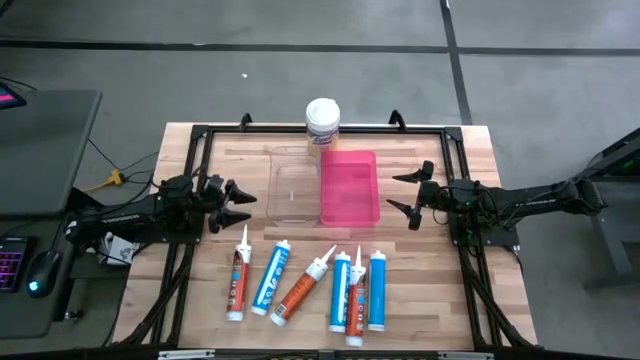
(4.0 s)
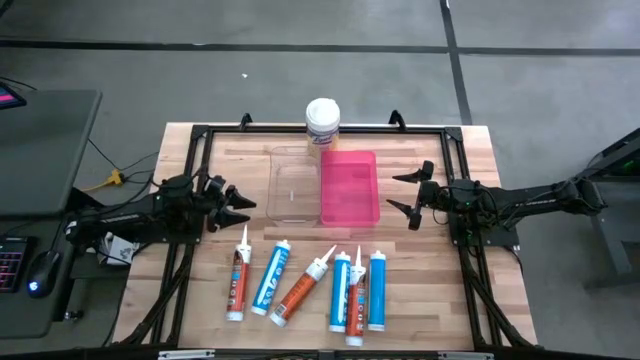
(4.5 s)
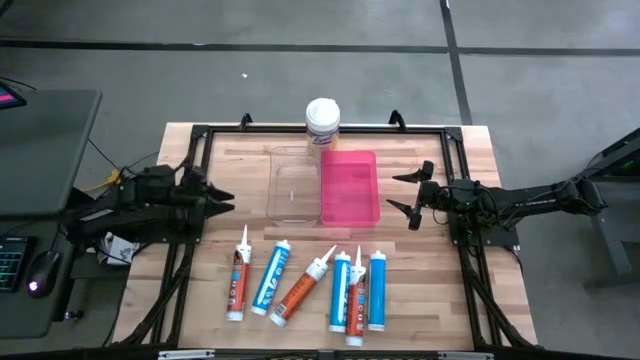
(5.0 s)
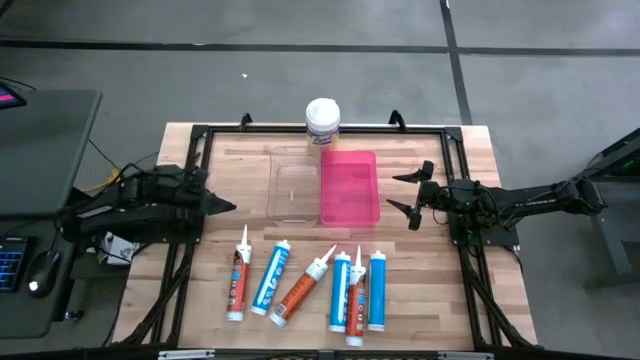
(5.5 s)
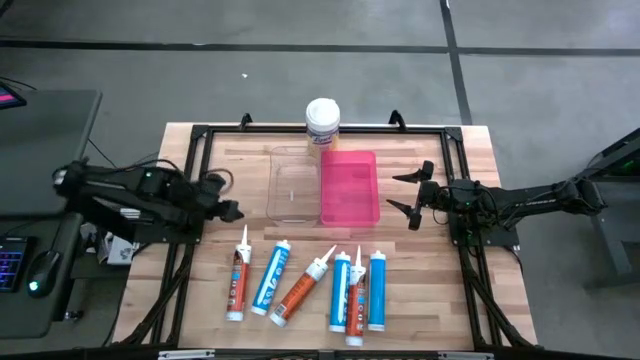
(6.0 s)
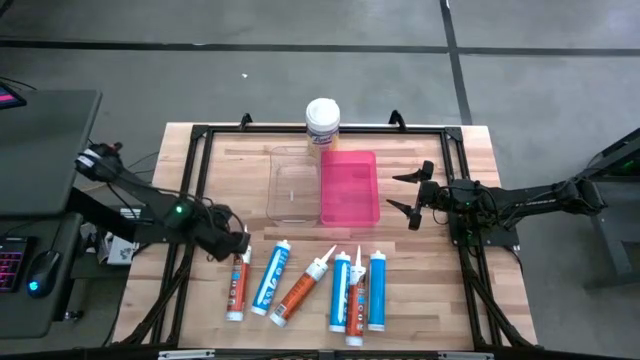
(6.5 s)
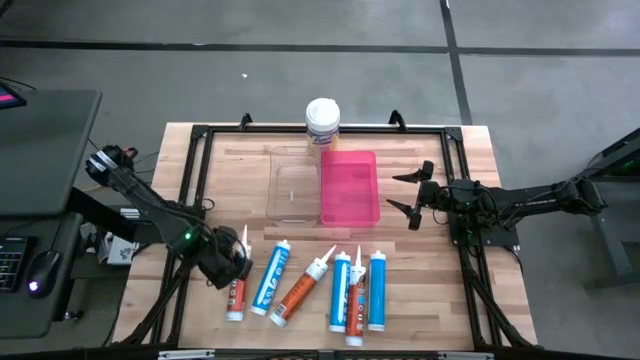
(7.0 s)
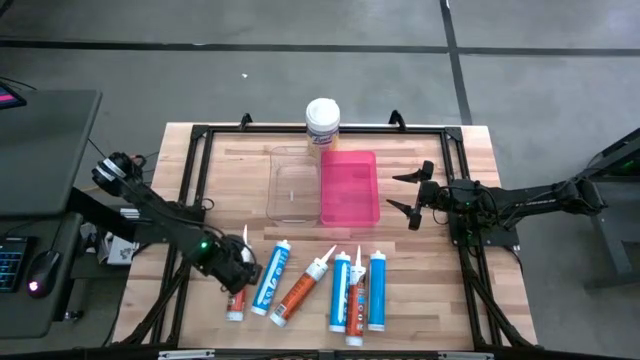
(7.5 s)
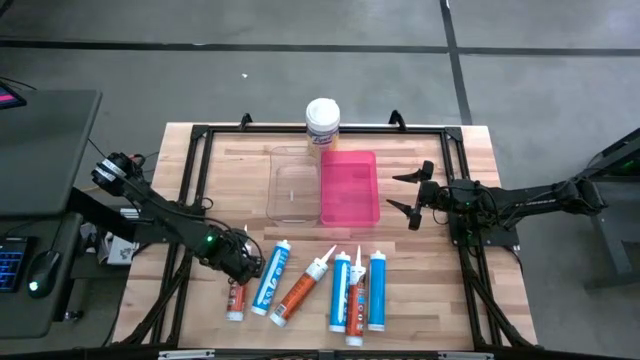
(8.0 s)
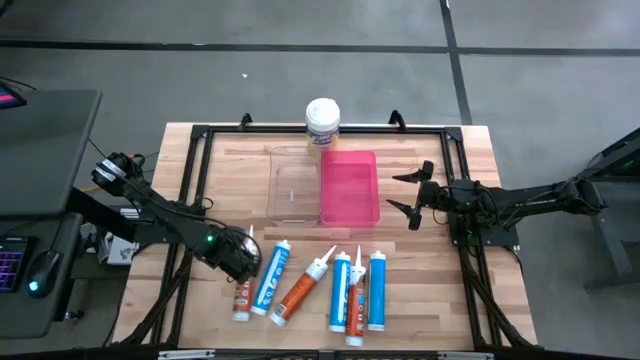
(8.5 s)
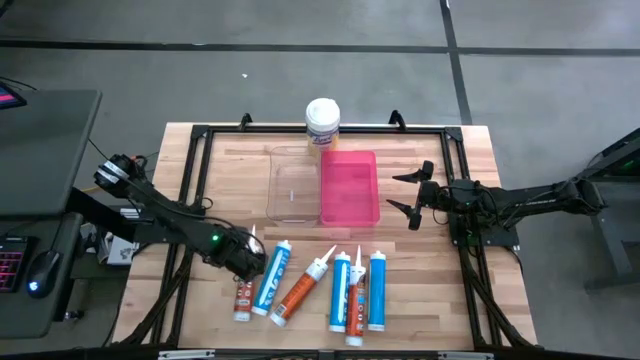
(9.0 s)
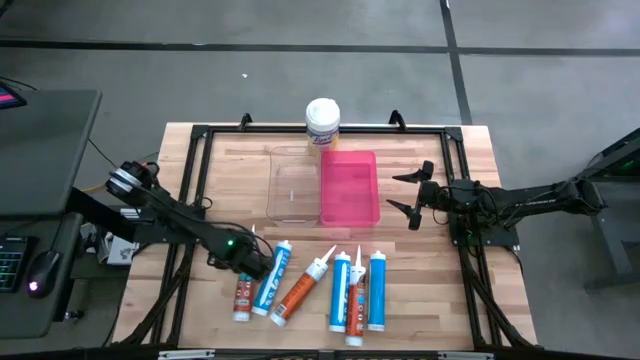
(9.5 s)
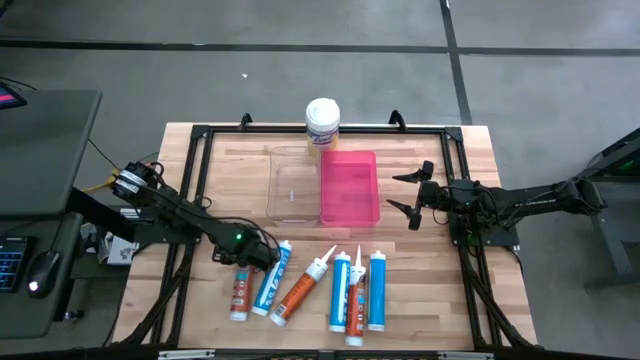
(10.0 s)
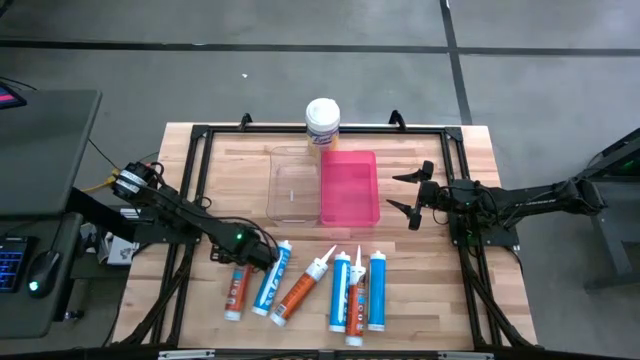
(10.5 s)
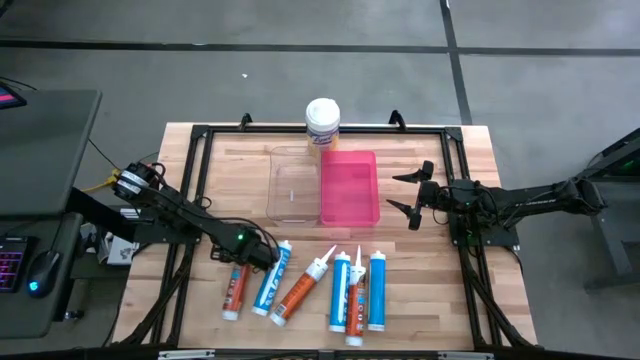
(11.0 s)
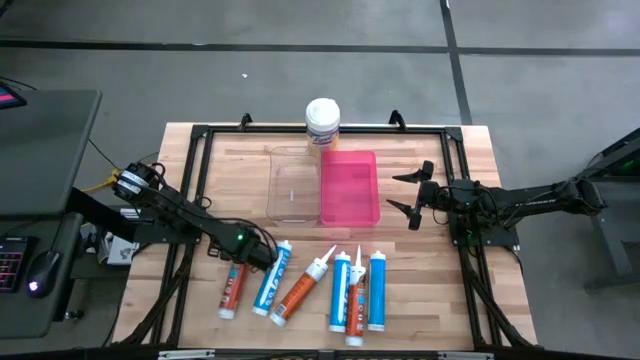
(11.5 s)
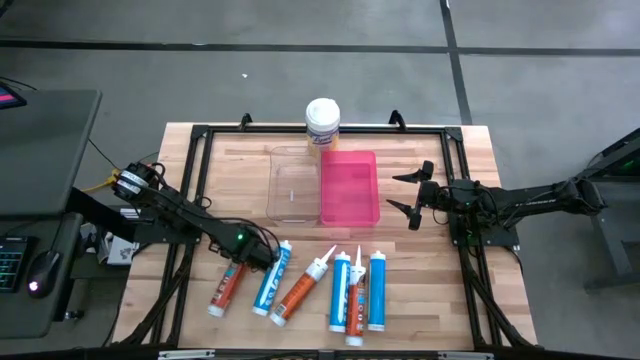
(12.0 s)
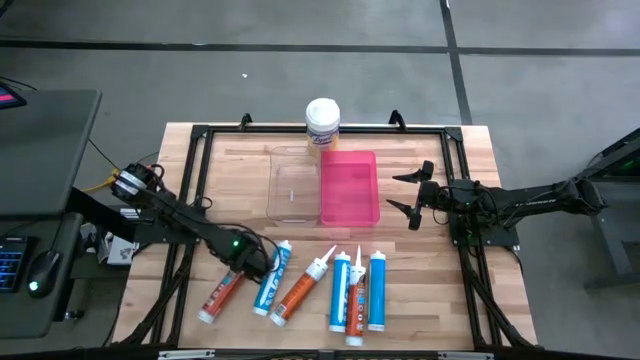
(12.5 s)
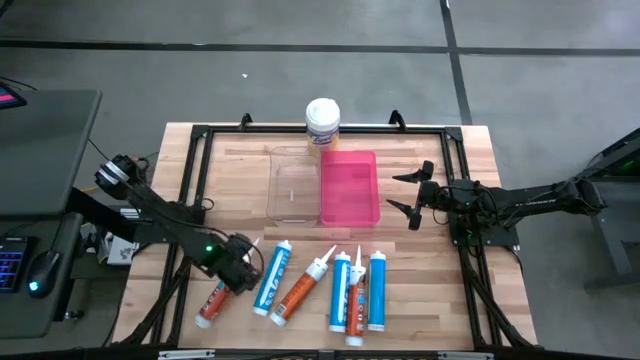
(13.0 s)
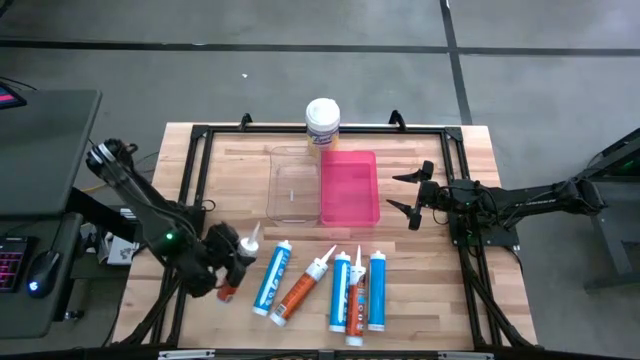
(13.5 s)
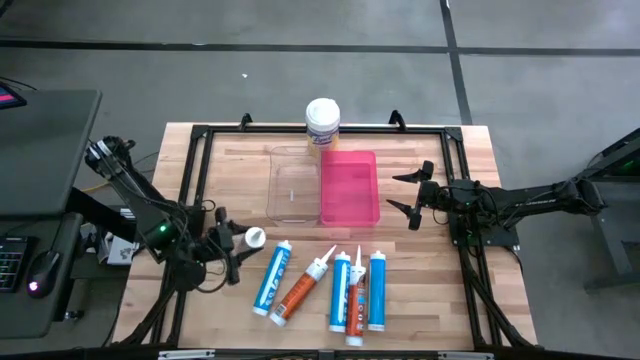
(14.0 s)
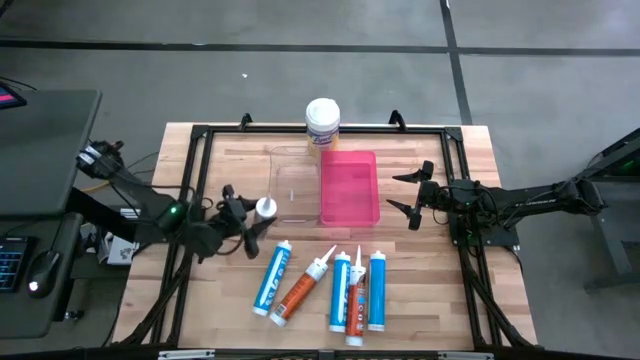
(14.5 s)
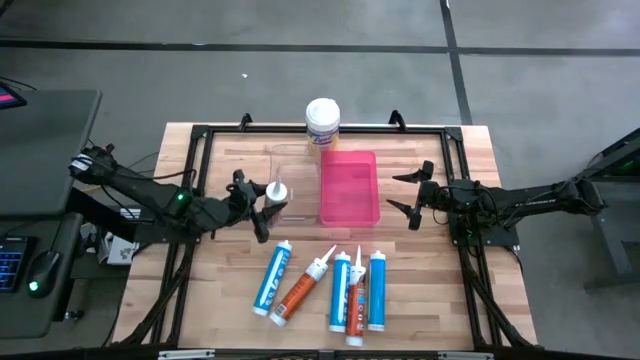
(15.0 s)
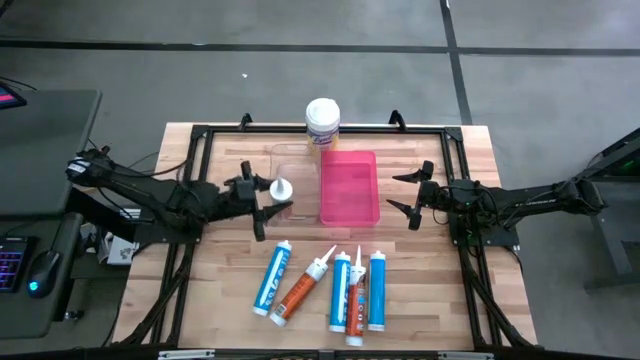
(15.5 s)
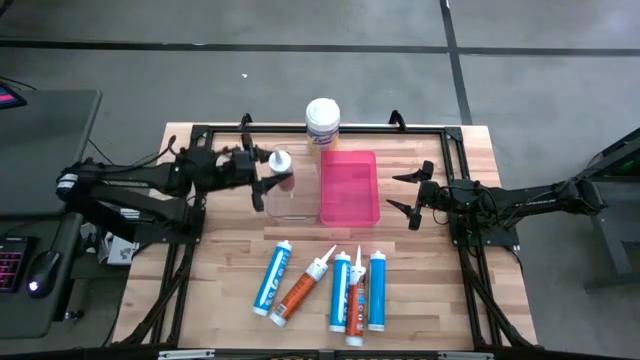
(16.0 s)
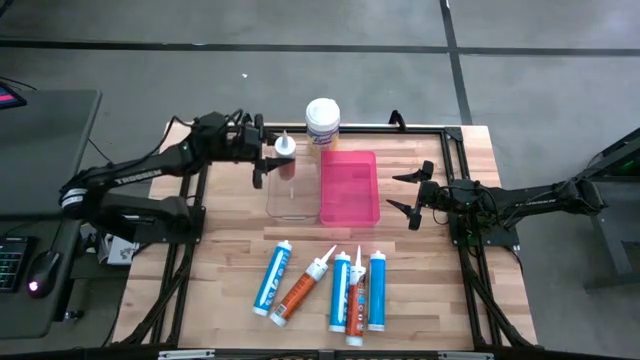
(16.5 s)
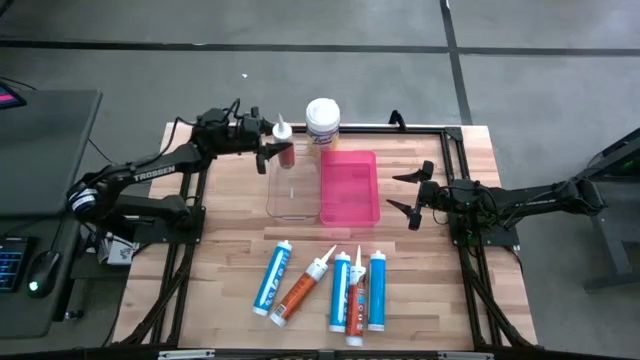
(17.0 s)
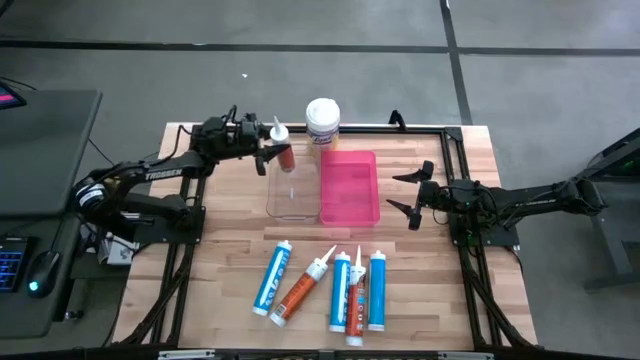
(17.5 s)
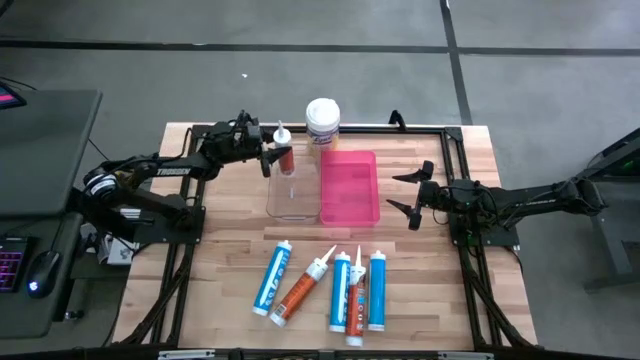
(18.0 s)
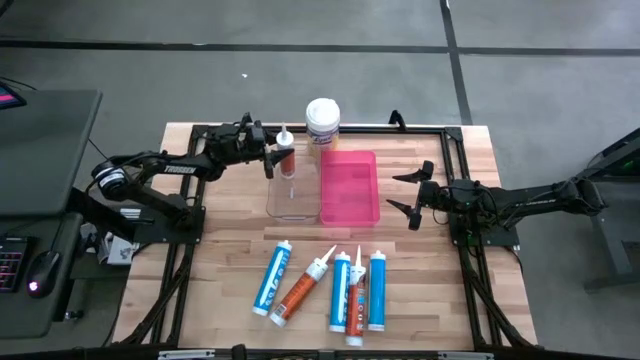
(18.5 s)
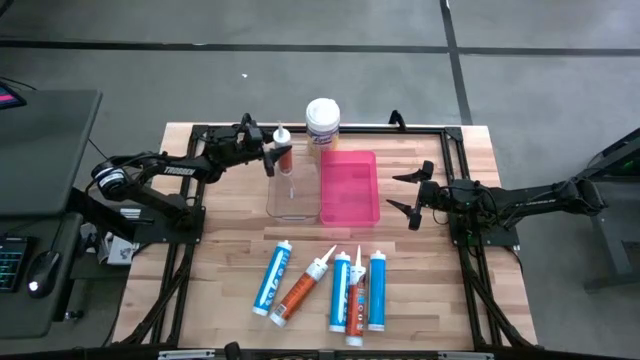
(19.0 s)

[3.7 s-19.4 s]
Task: Pick & place silicon tubes, Sealant and Lysol wipes
Put the left orange sealant into the transparent container

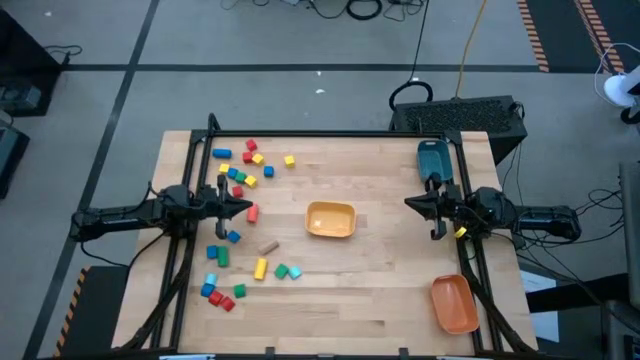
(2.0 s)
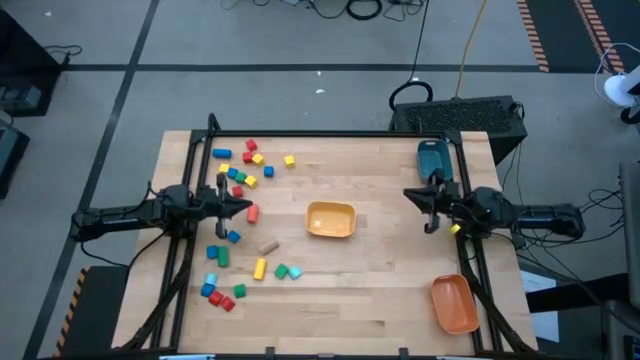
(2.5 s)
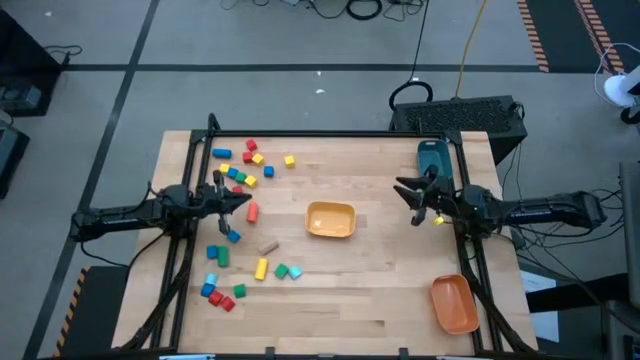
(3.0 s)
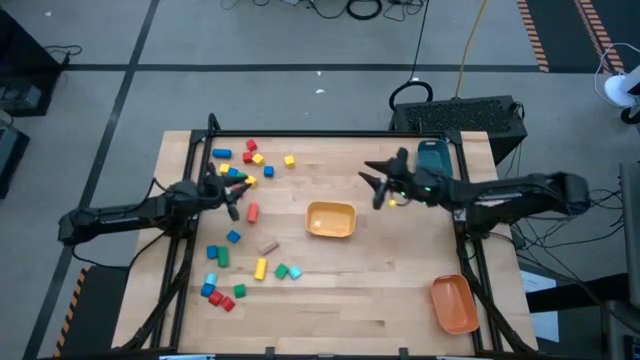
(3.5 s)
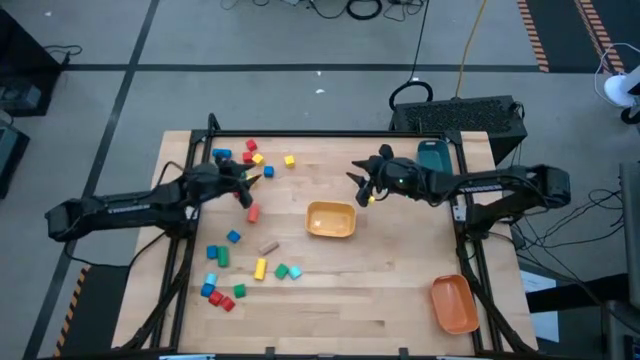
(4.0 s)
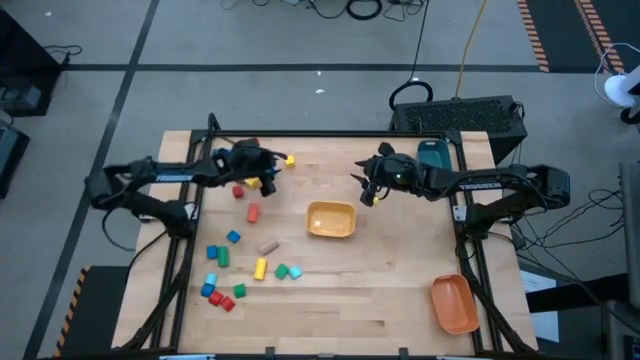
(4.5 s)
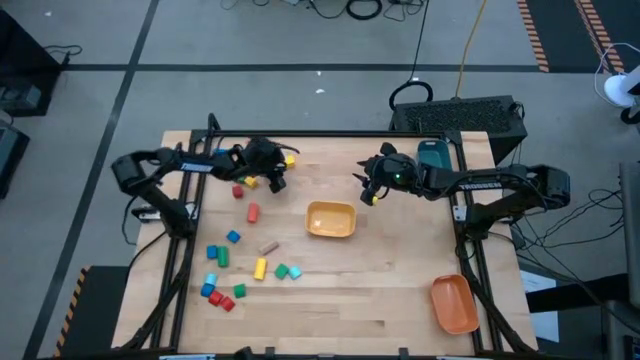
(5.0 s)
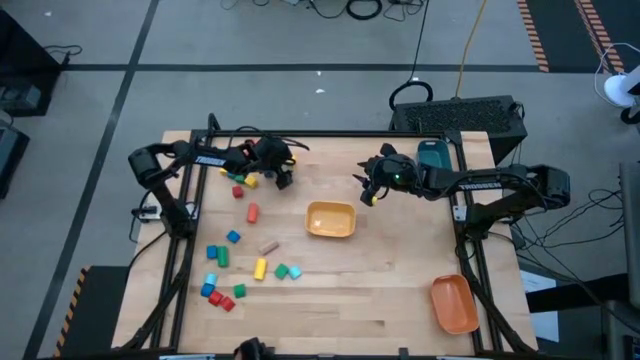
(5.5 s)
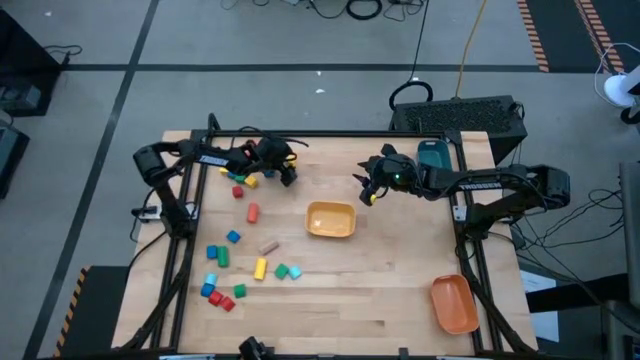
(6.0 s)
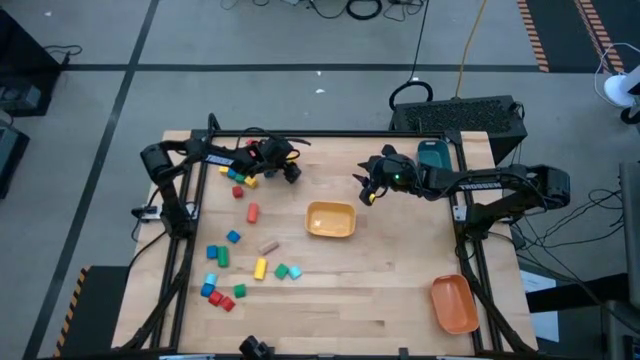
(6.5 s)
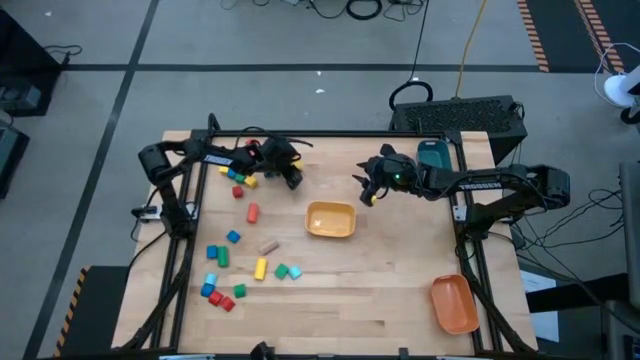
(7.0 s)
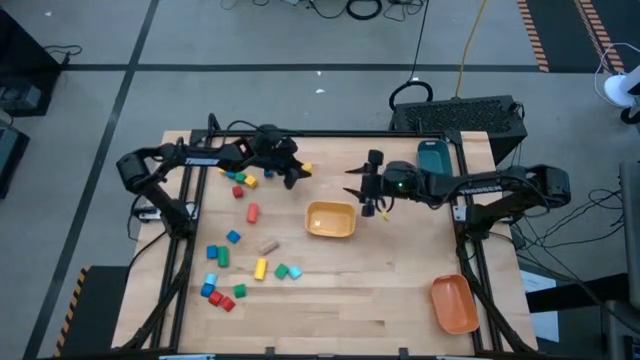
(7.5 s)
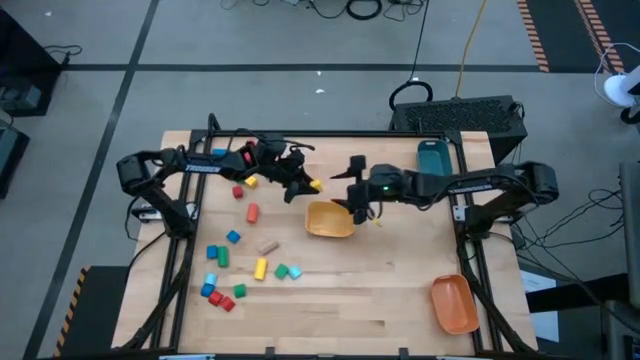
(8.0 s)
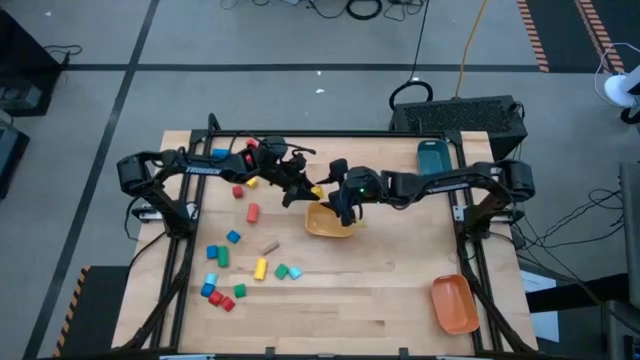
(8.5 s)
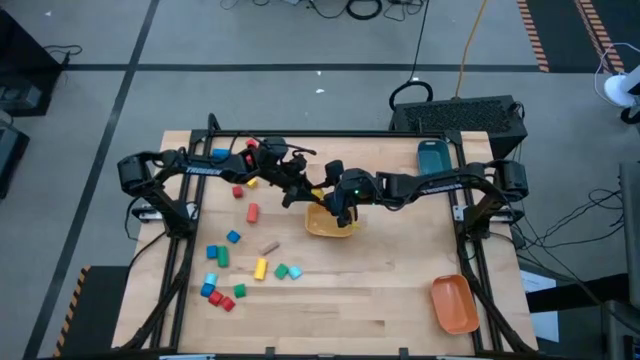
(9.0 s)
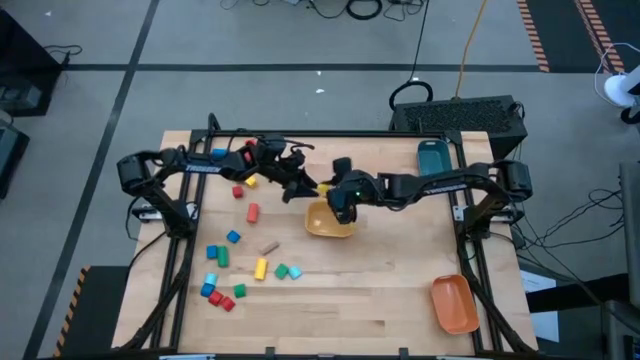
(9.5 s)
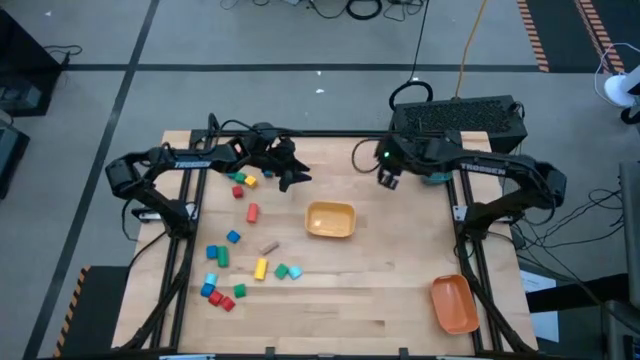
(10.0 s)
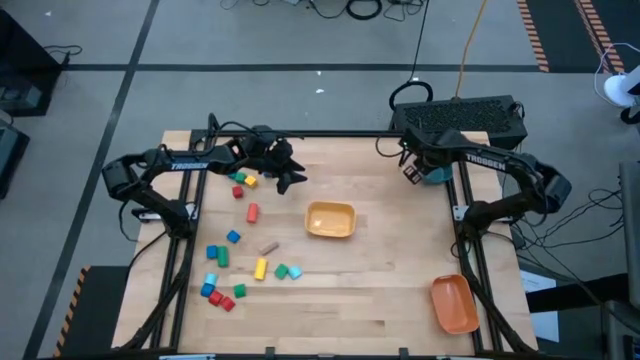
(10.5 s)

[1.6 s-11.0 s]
Task: Sort blocks by size
Put the yellow square block into the blue bin
